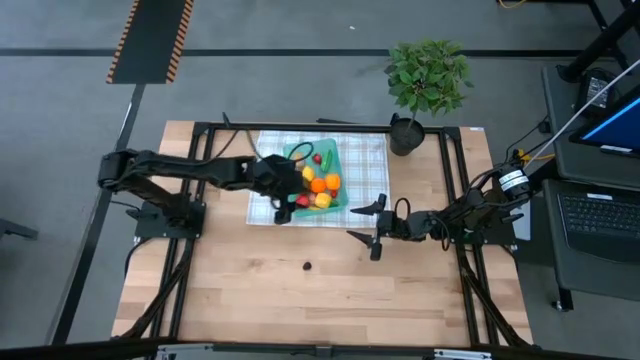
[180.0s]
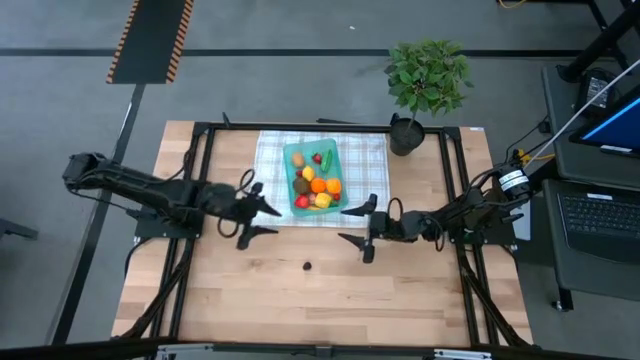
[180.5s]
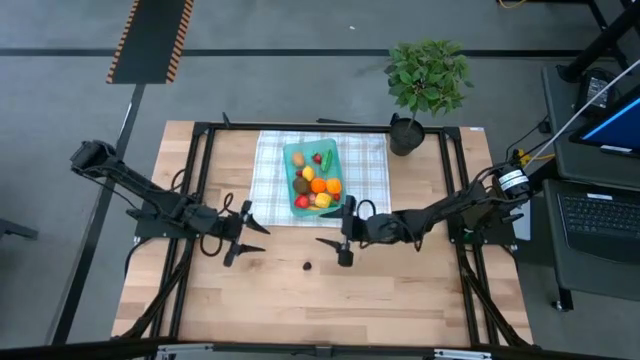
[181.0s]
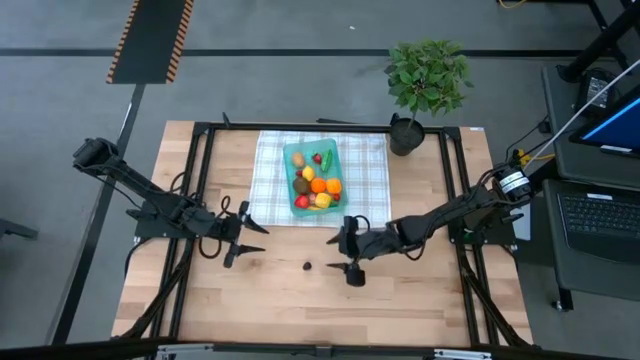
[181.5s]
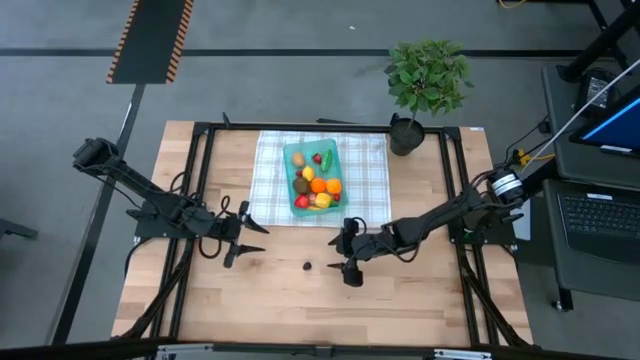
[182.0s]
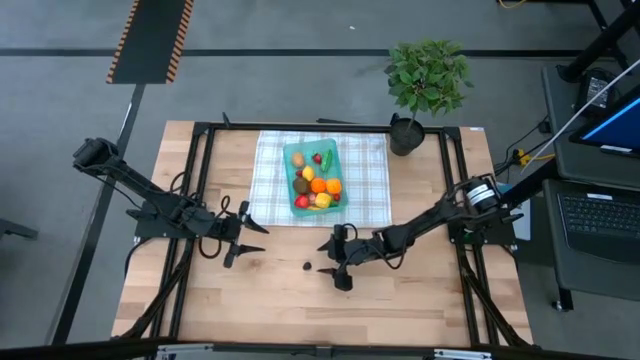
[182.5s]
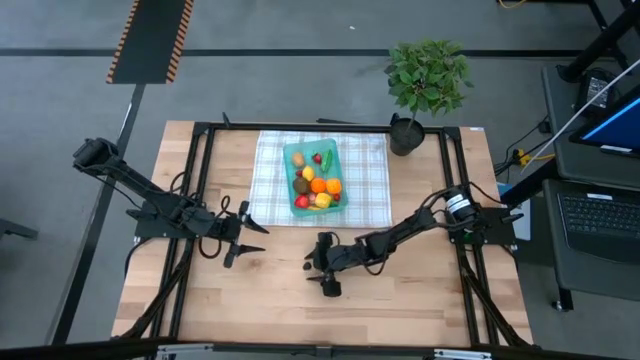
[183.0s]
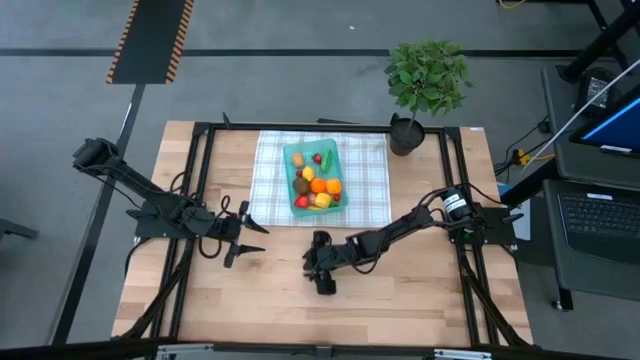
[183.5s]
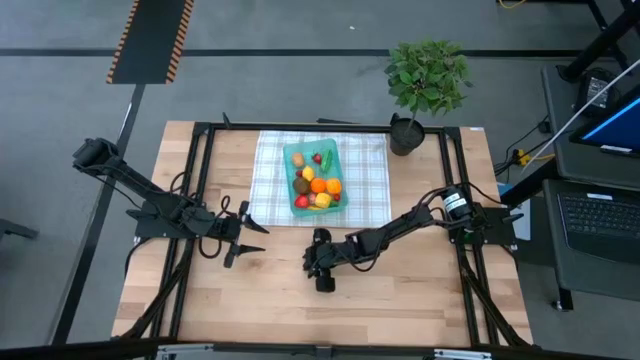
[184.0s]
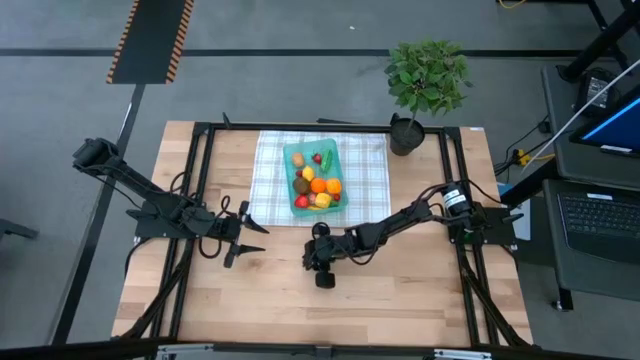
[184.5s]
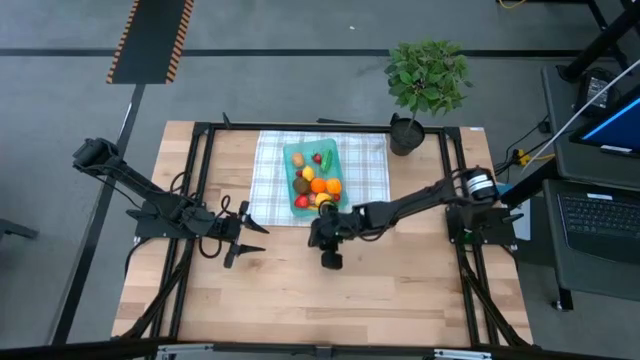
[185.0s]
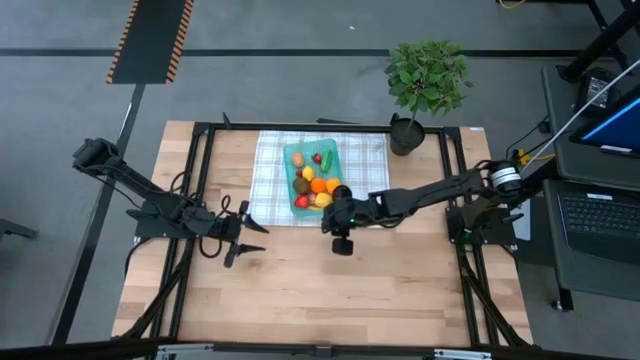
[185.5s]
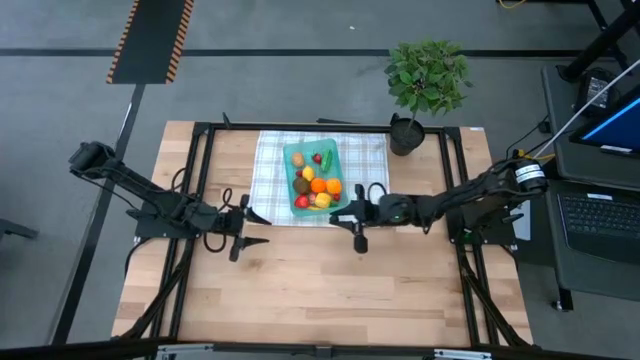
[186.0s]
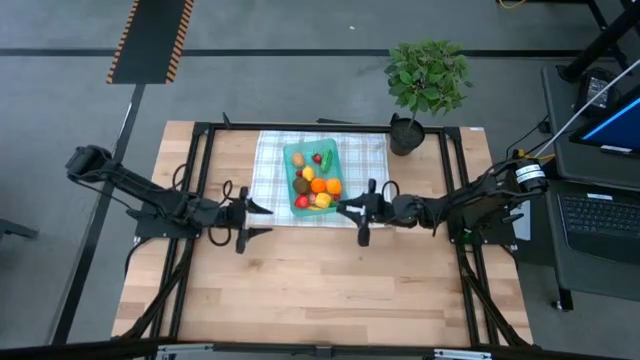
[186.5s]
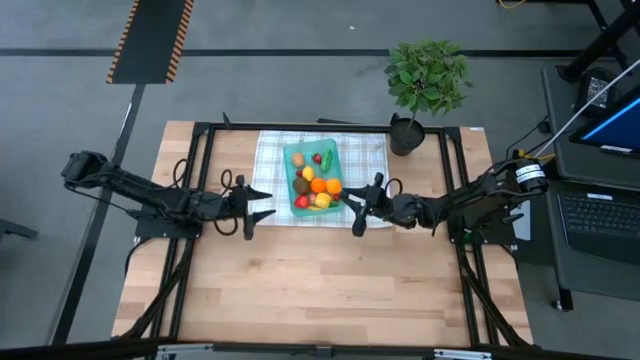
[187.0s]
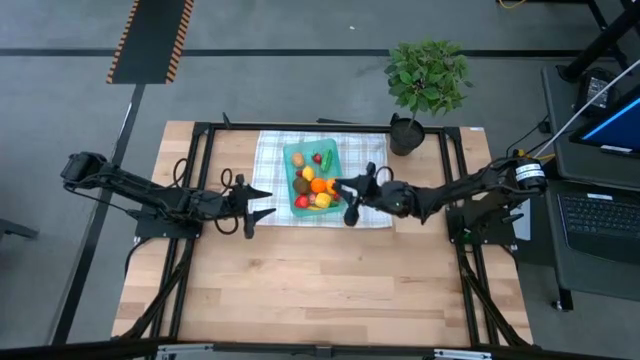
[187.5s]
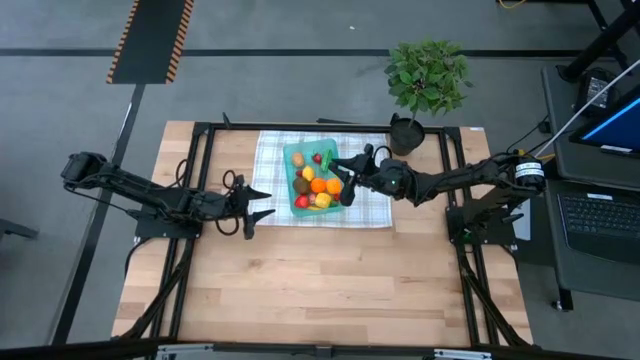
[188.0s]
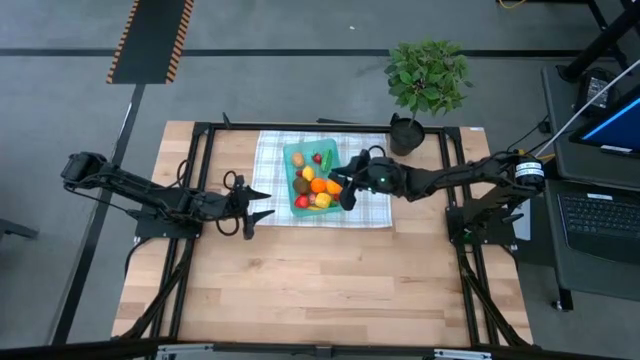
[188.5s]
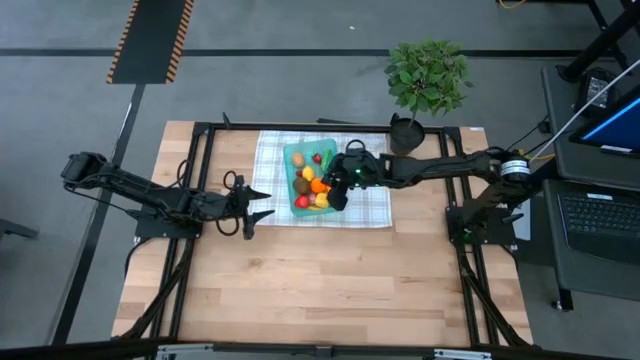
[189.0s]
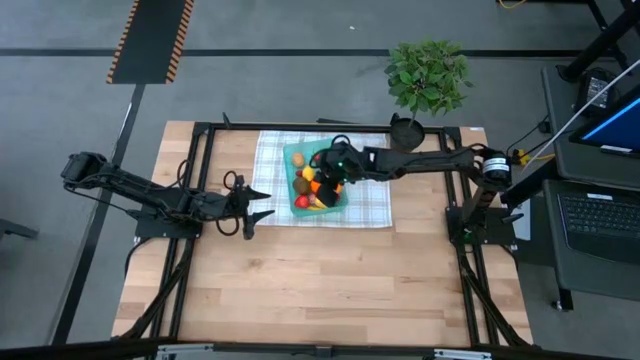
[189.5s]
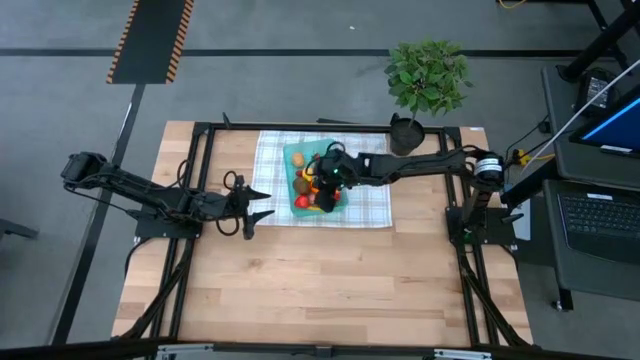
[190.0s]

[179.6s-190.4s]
Task: Pick and placing Produce into tupperware
Put the blackberry into the blue bin

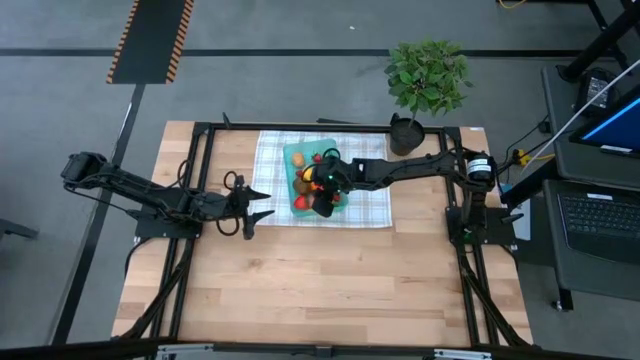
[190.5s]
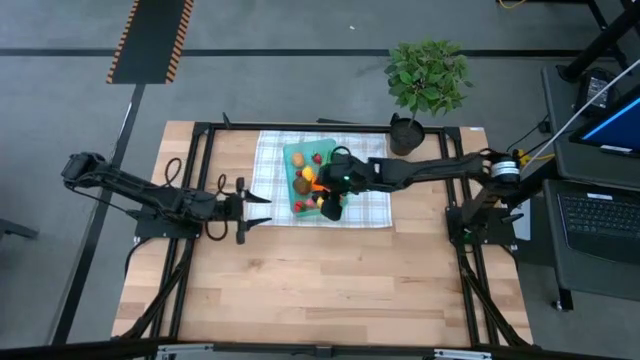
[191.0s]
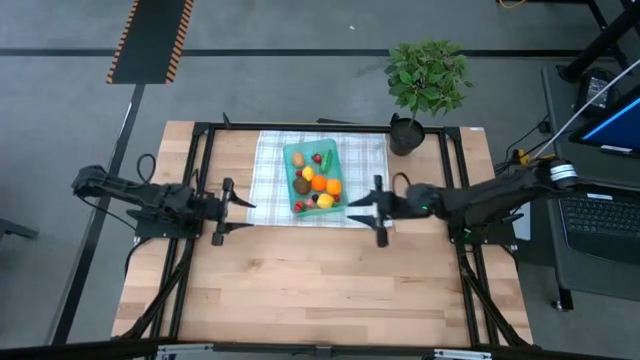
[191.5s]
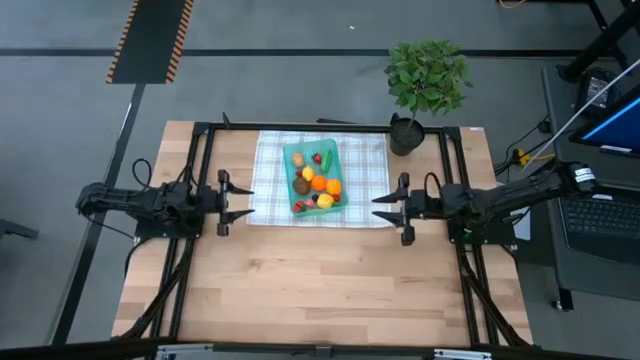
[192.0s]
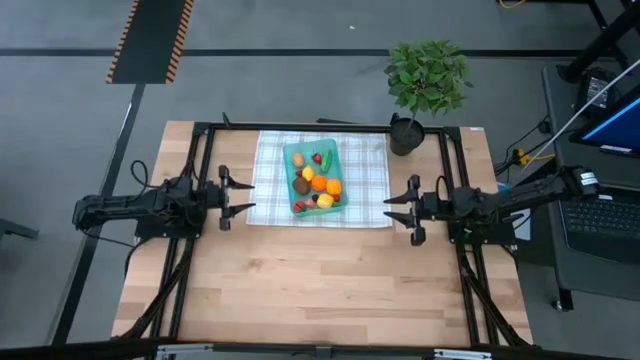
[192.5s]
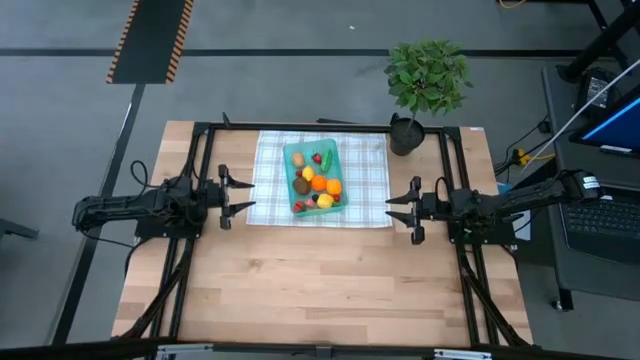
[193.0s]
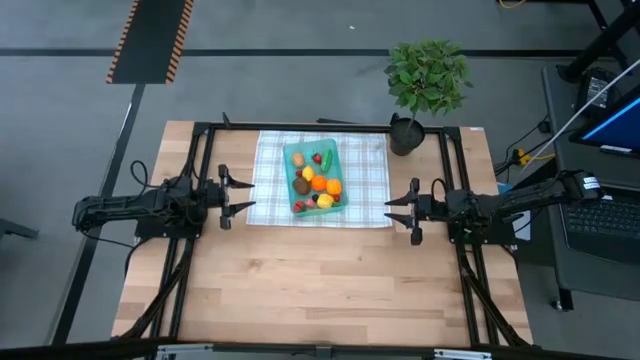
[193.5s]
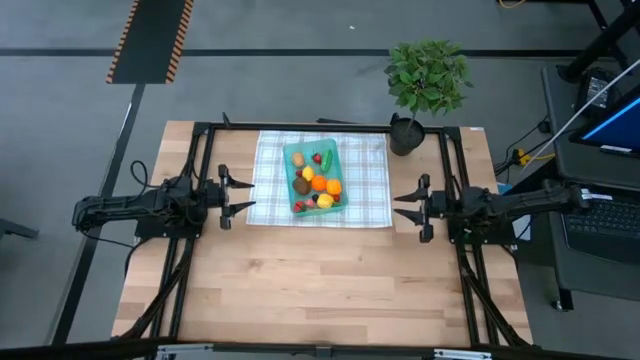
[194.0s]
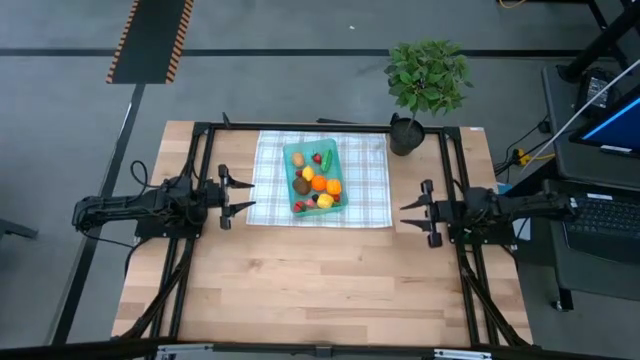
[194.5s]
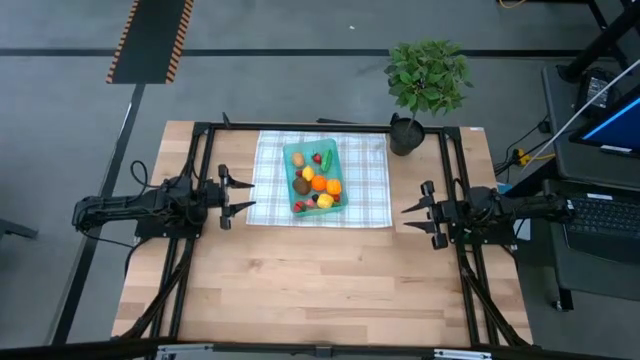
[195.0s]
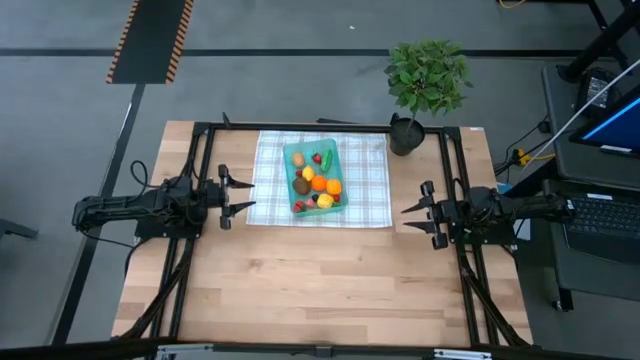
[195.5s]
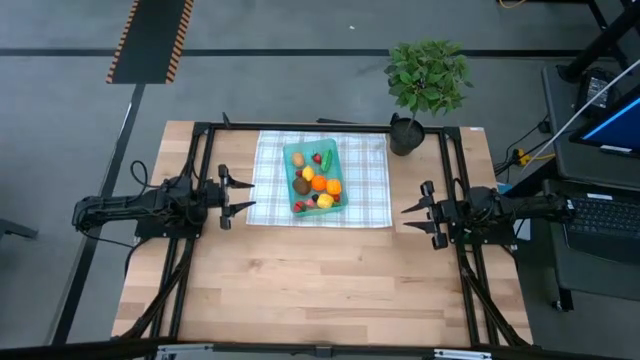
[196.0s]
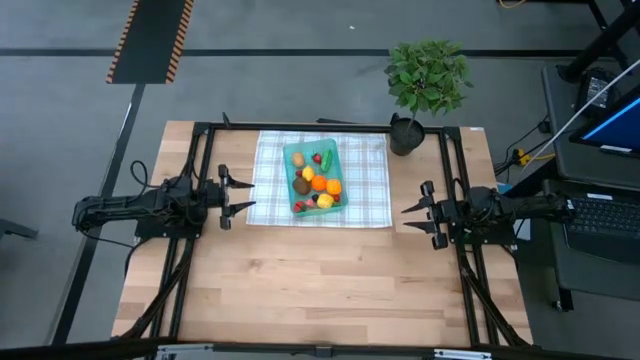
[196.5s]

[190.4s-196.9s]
Return to Home Position

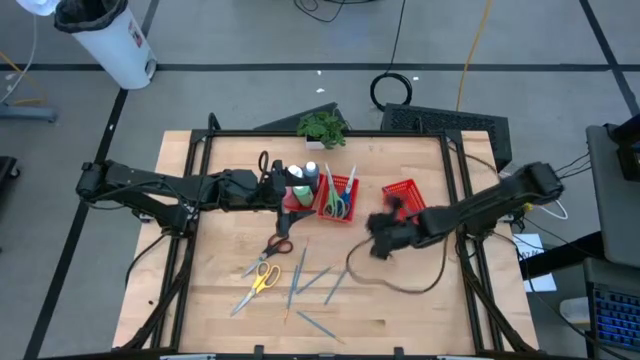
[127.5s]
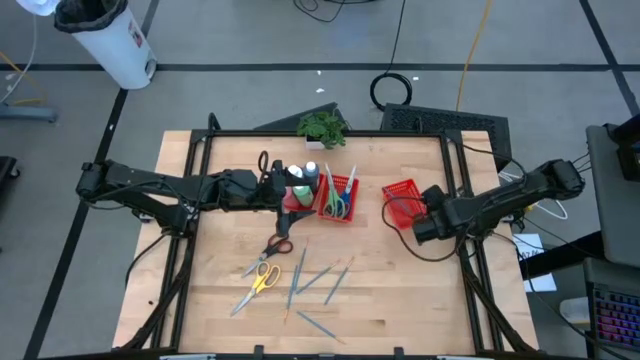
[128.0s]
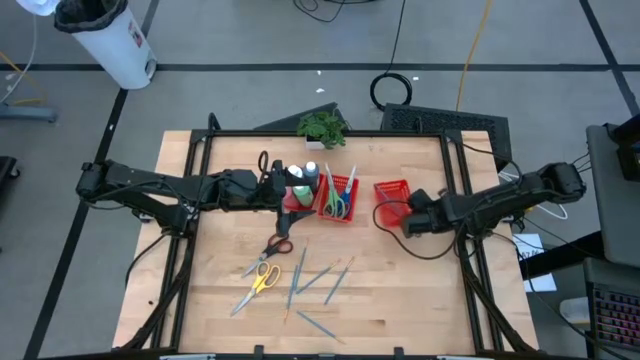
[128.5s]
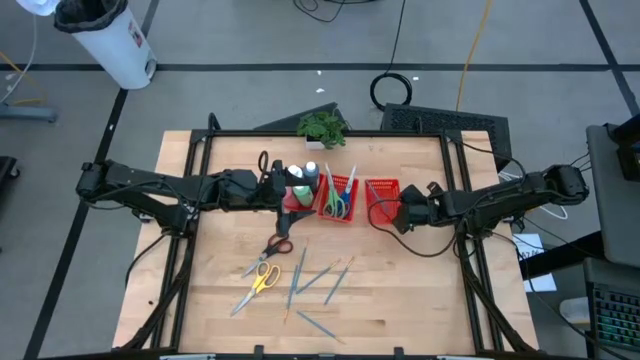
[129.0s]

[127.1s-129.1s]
Task: Pick & Place Paint Supplies
Adjust the right red bin on the table
